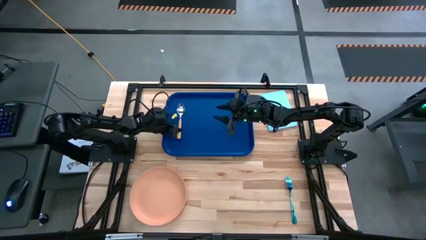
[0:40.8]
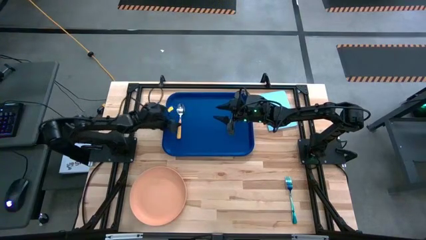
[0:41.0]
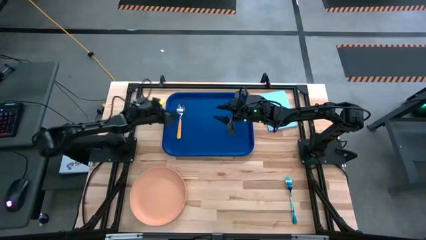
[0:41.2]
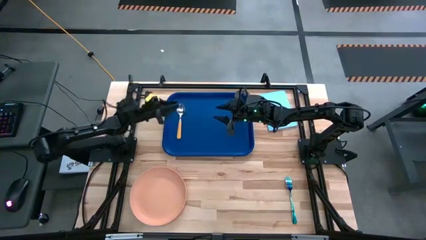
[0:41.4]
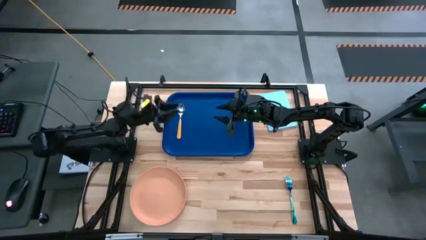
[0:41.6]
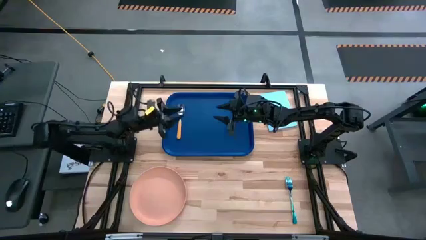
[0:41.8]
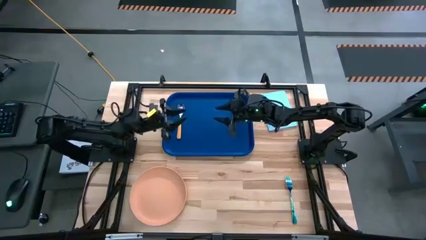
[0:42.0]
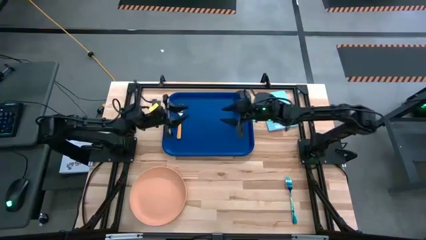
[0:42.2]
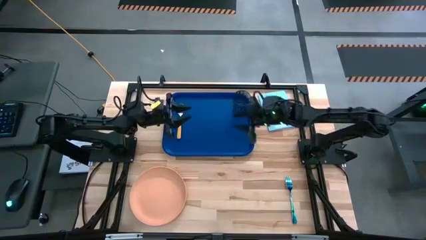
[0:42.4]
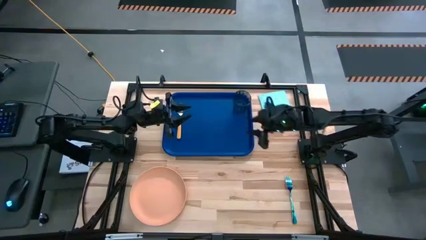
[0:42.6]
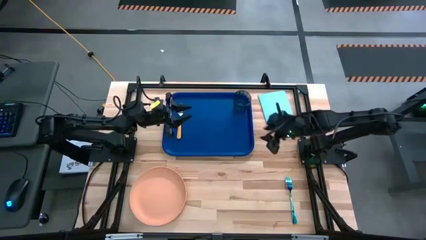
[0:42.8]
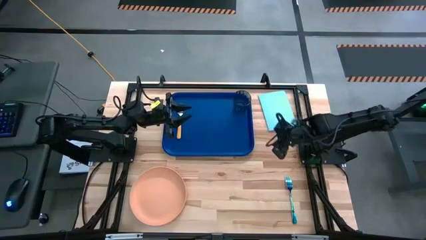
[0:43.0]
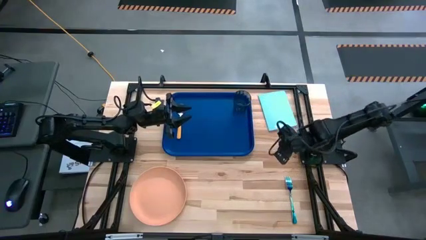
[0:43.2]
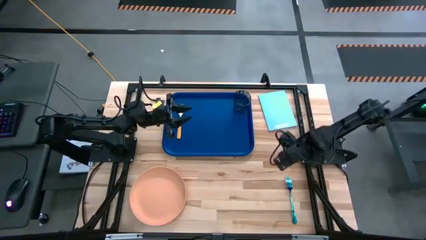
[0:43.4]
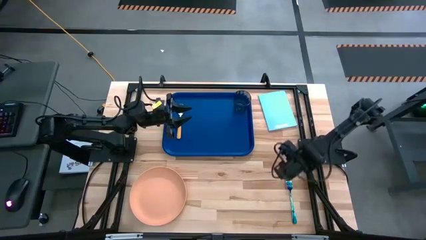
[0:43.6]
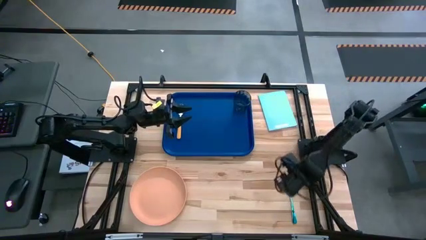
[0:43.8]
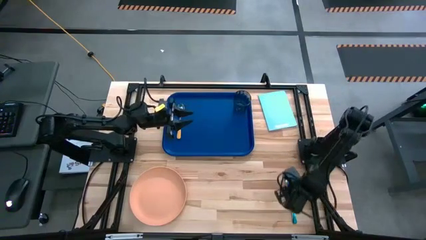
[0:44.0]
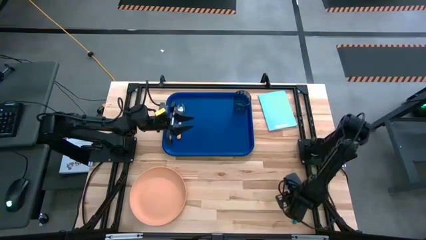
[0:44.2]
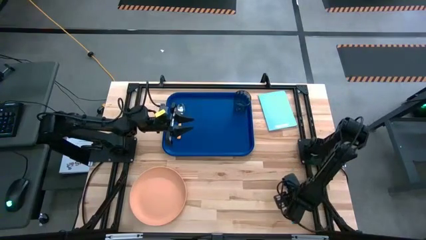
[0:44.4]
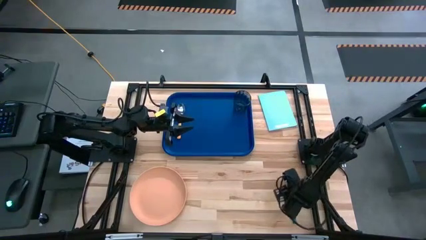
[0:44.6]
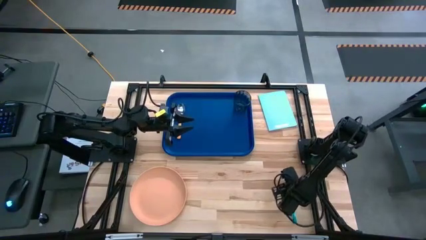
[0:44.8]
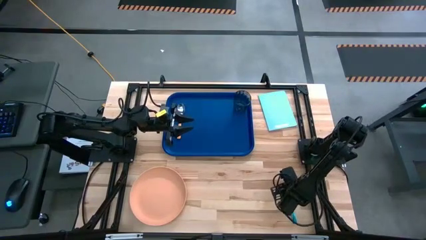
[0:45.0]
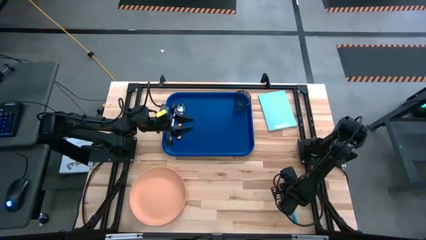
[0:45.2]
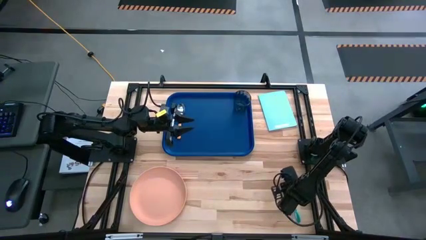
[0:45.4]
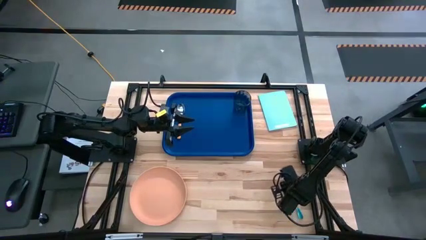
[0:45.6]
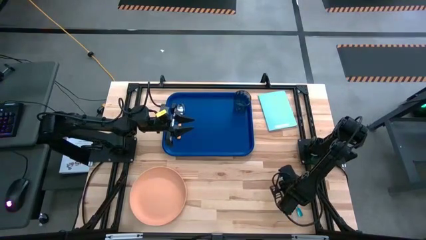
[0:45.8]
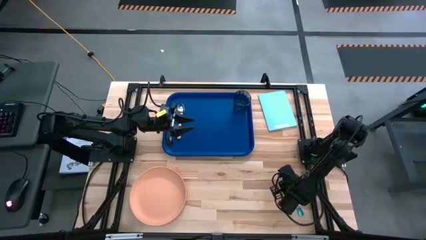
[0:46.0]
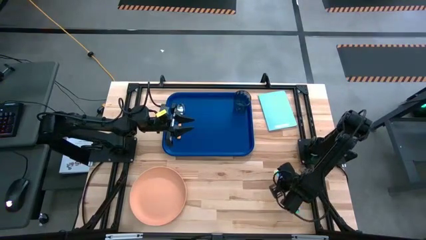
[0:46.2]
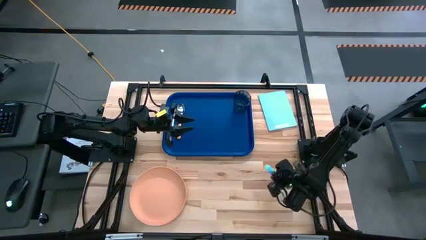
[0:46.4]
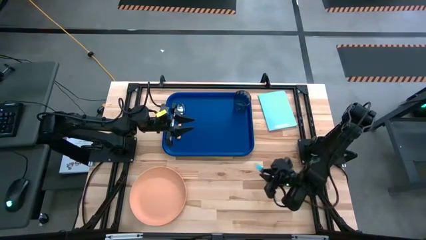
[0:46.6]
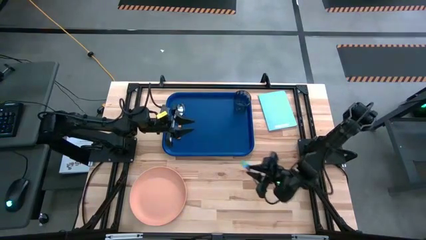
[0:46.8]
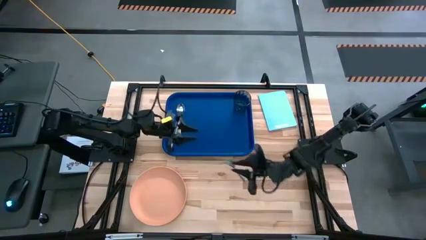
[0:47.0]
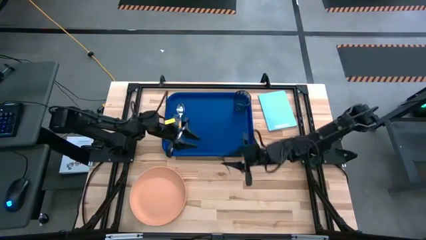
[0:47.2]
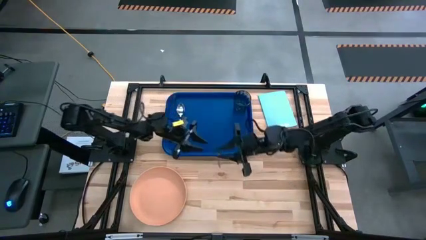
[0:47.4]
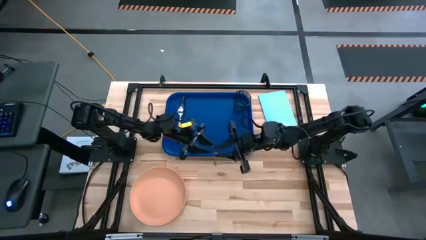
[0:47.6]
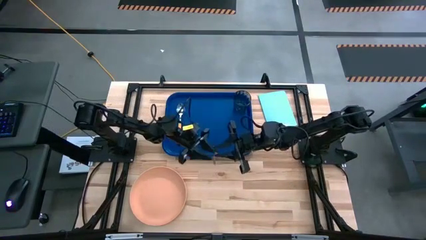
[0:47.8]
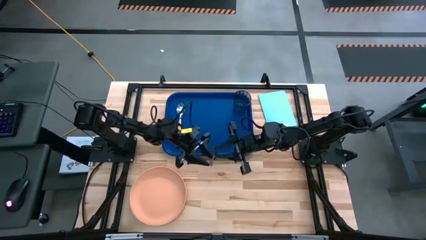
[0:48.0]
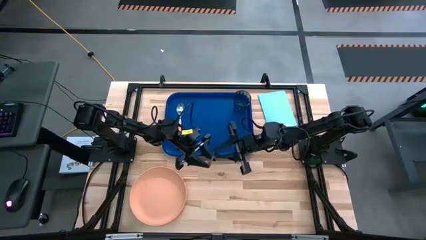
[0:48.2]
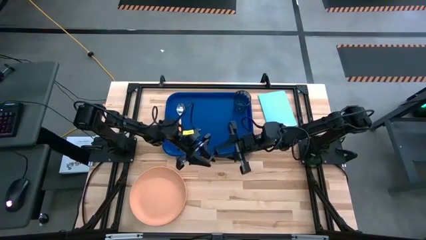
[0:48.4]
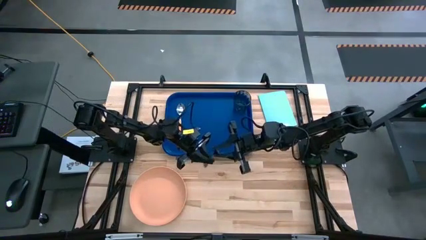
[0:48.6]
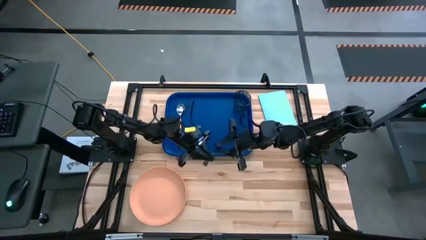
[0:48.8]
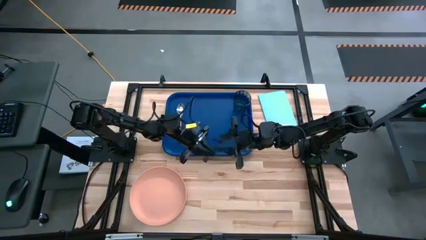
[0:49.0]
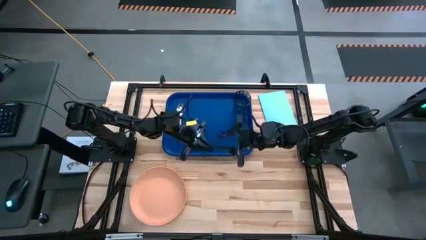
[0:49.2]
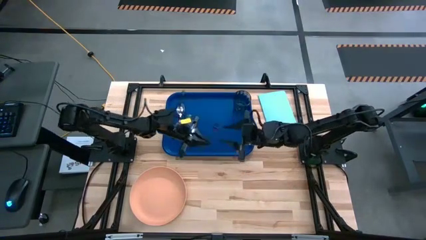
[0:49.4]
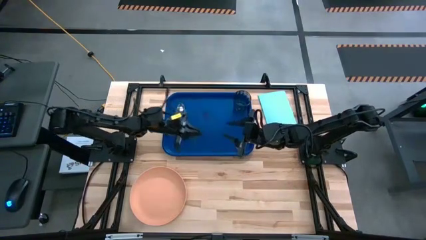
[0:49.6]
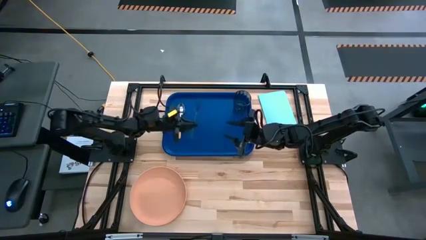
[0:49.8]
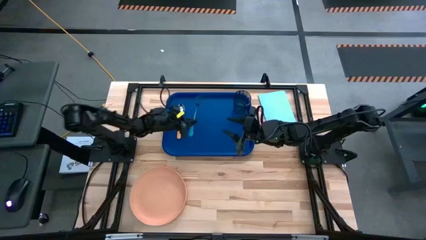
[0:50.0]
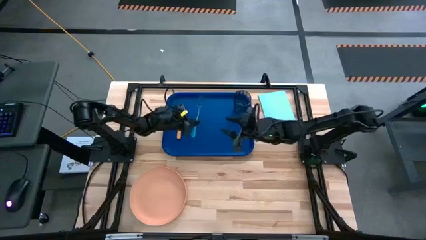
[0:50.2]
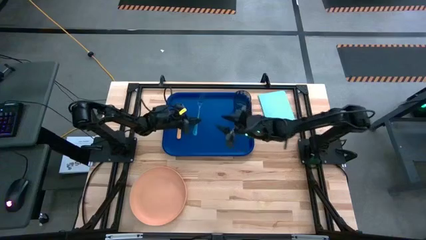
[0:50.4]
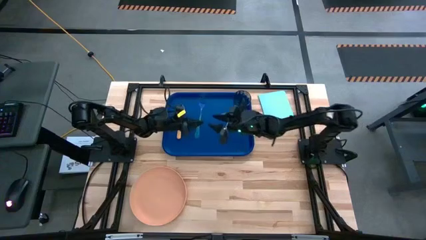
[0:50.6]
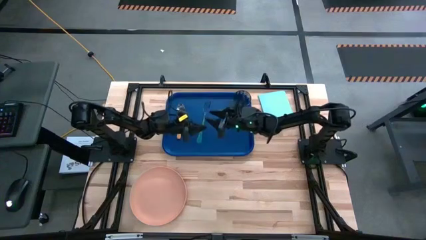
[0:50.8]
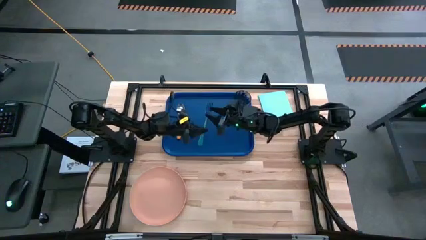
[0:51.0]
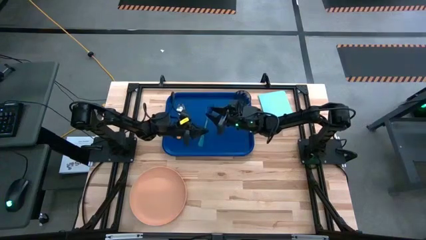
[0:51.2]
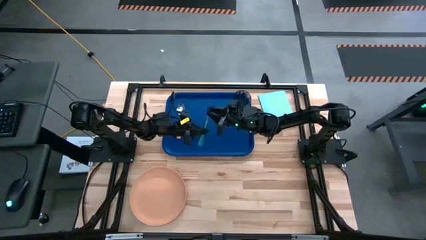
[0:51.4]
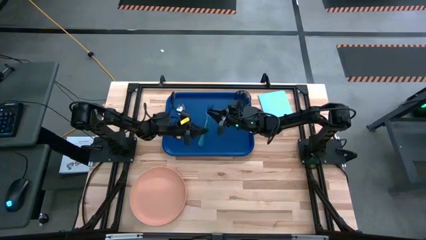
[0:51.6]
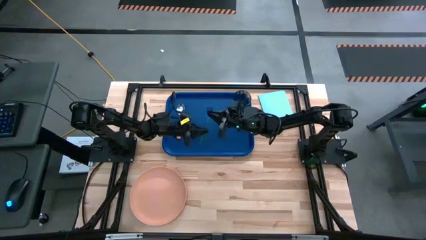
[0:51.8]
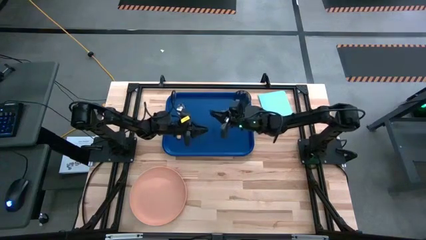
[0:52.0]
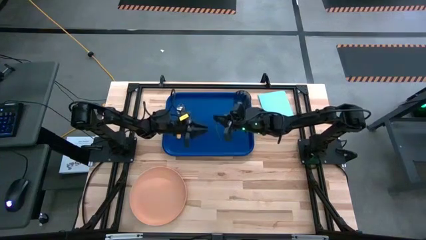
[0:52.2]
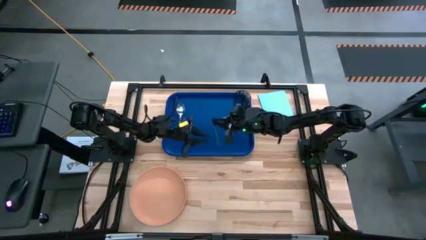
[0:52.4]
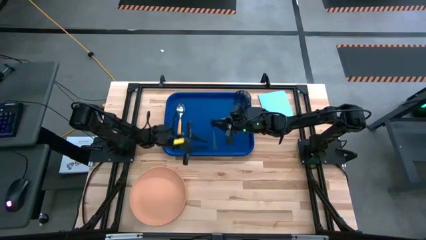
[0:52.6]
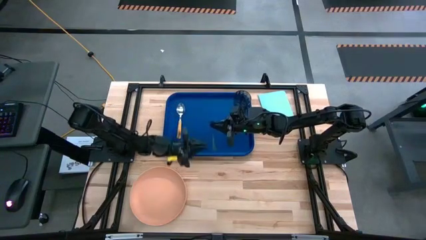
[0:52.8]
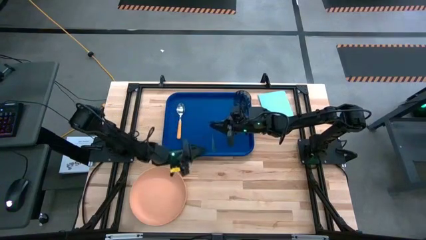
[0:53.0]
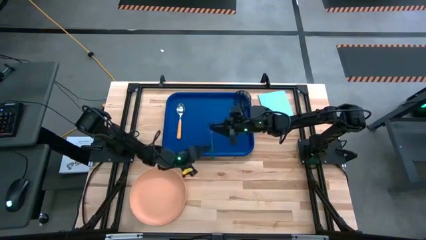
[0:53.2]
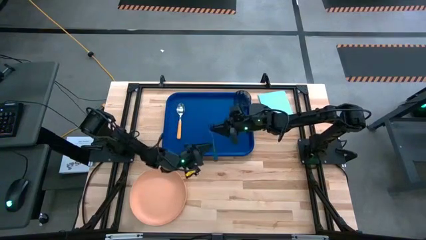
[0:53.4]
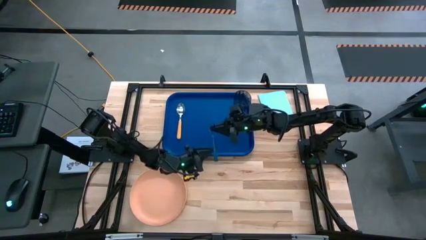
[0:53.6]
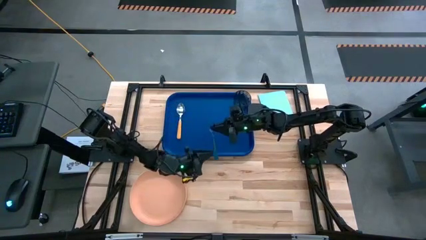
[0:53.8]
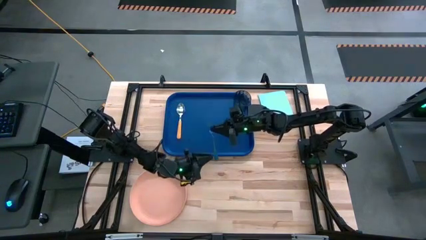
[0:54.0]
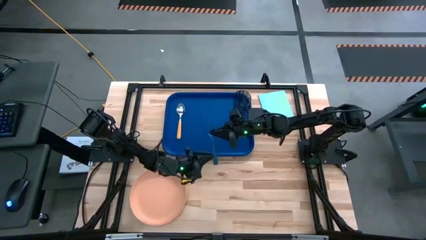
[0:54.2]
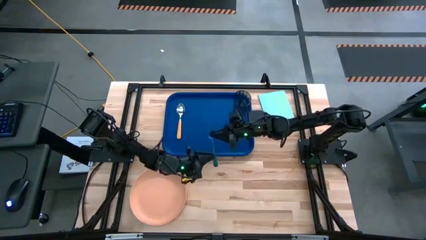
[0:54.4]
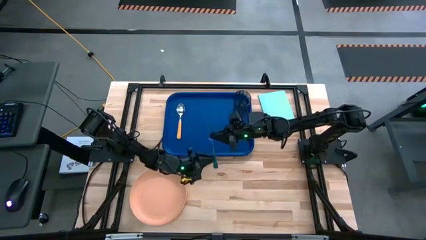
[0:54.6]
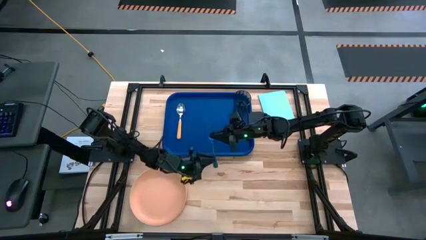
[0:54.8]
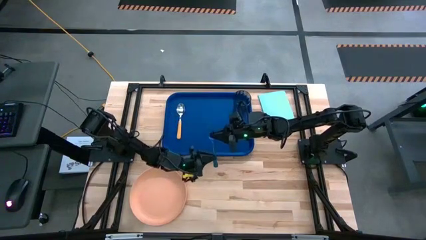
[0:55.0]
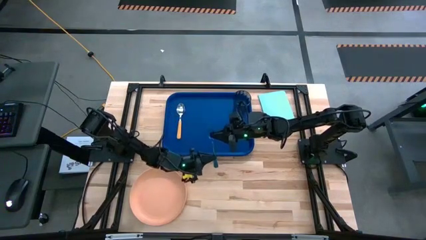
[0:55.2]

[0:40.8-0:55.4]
Task: Pick and place plate/cup/fork/spoon on tray
Put the blue fork to the right of the orange spoon on the blue serving tray
